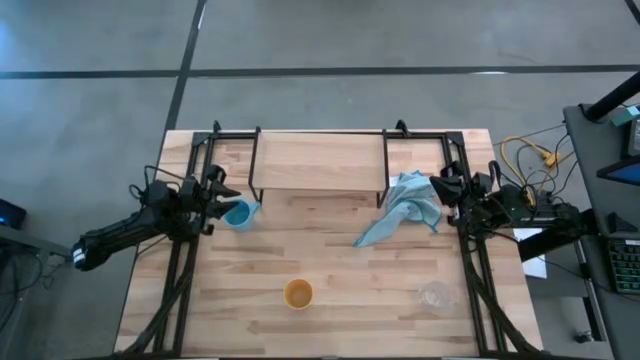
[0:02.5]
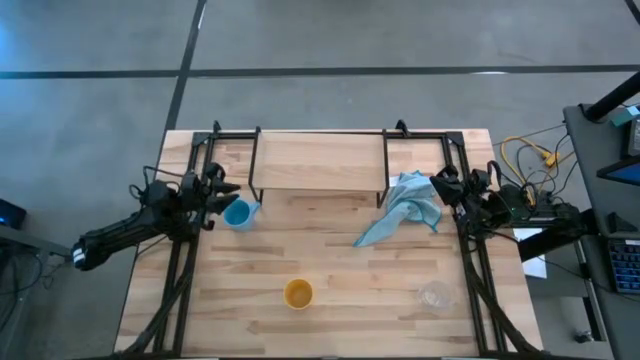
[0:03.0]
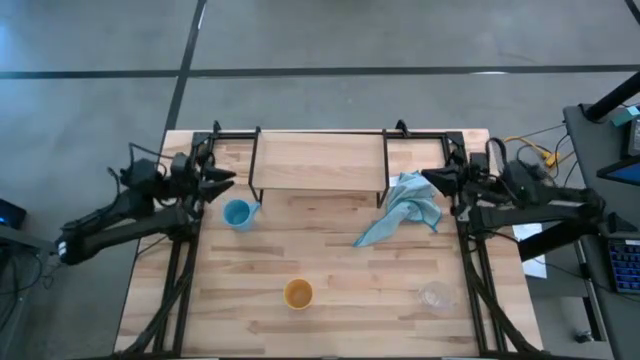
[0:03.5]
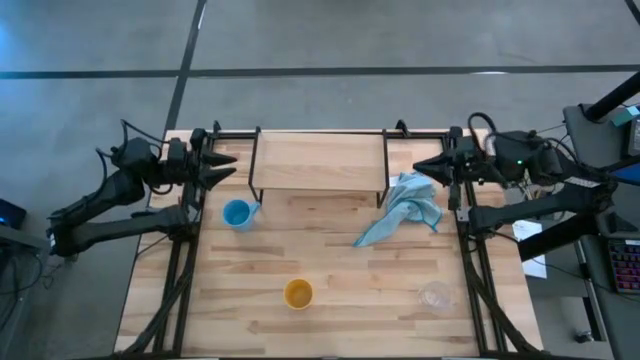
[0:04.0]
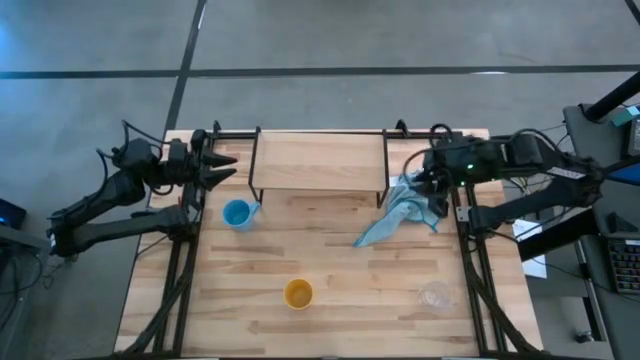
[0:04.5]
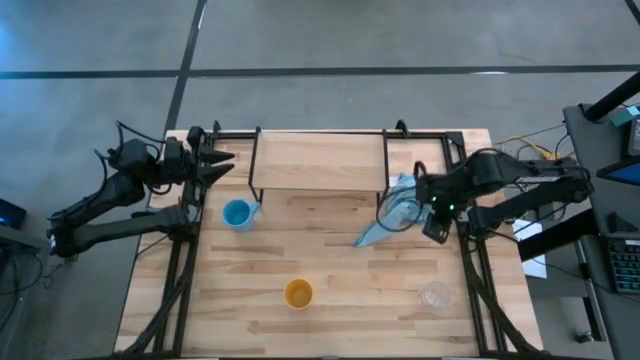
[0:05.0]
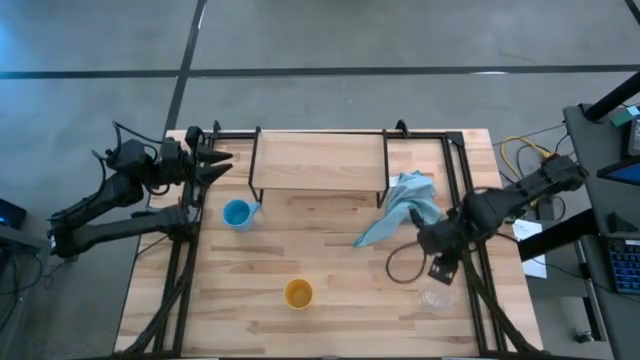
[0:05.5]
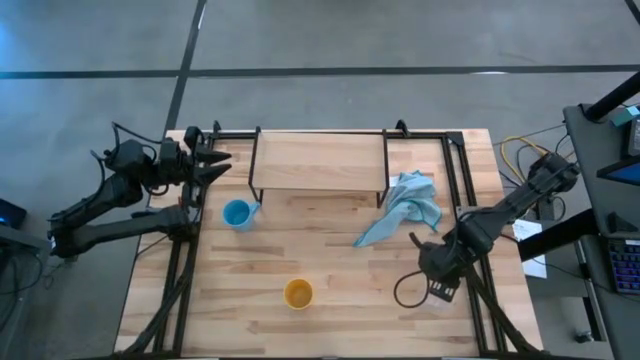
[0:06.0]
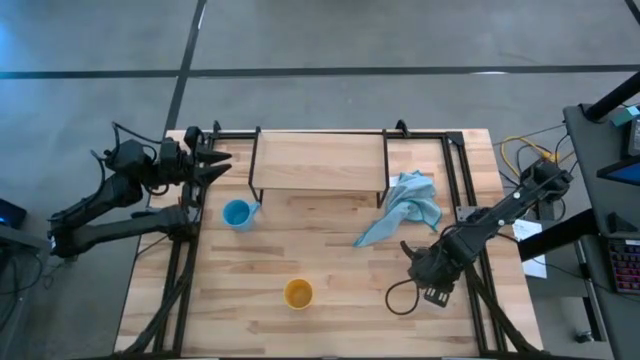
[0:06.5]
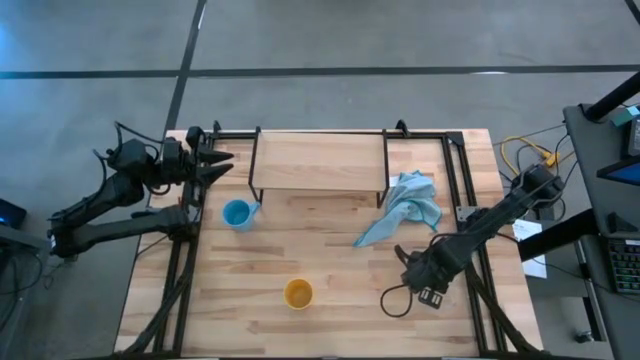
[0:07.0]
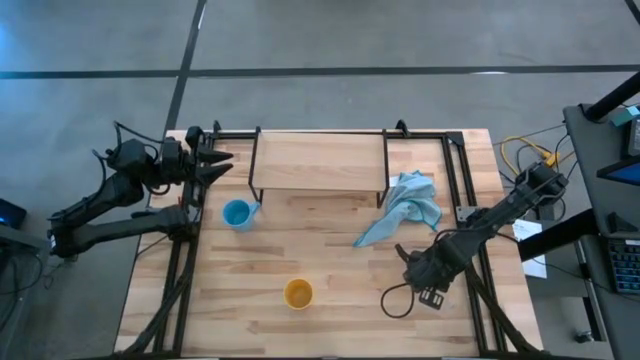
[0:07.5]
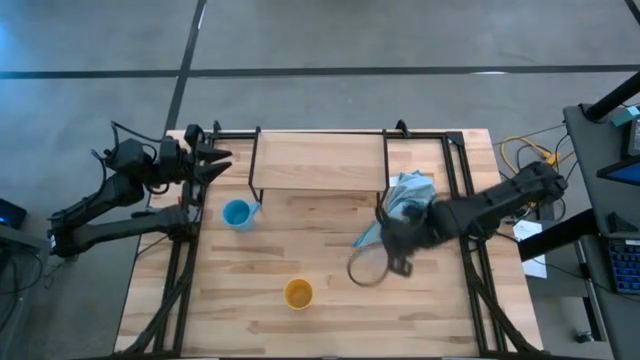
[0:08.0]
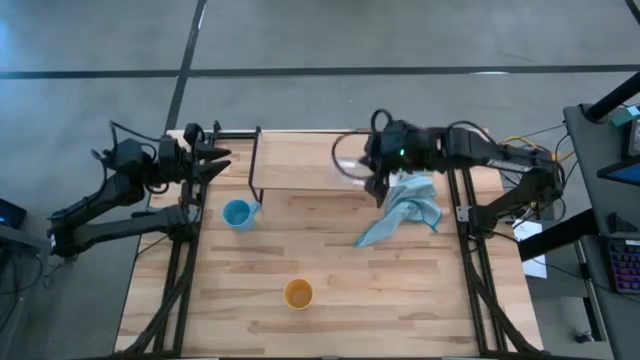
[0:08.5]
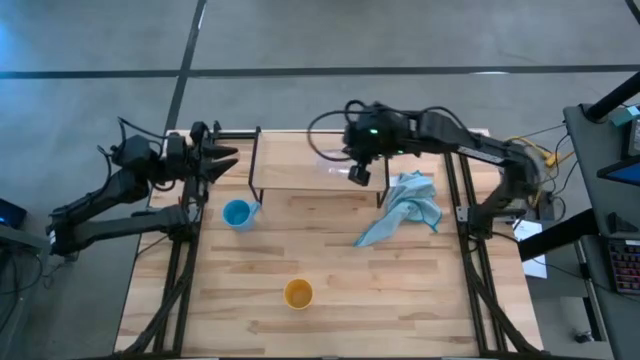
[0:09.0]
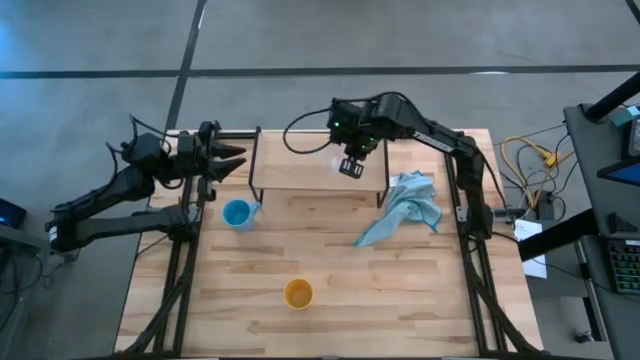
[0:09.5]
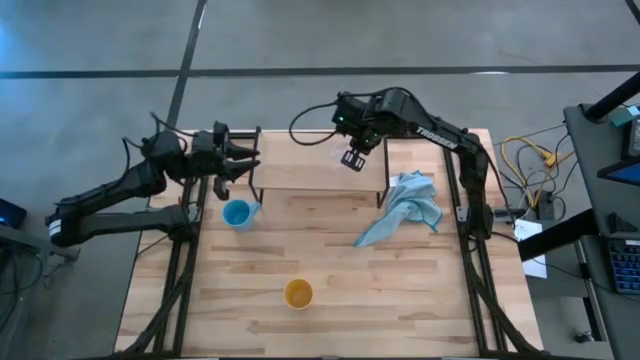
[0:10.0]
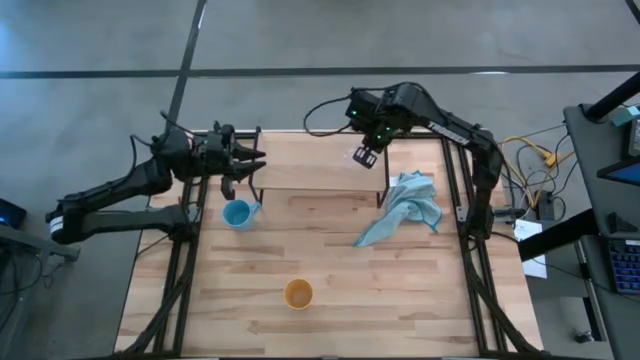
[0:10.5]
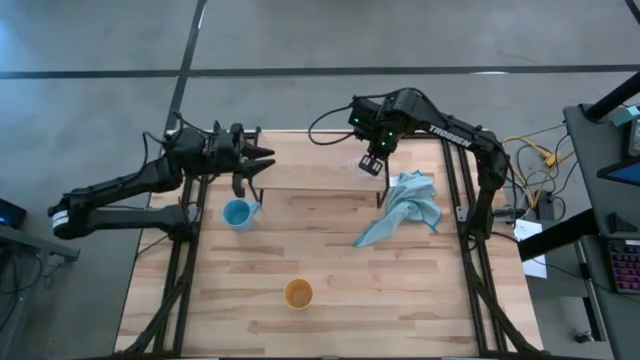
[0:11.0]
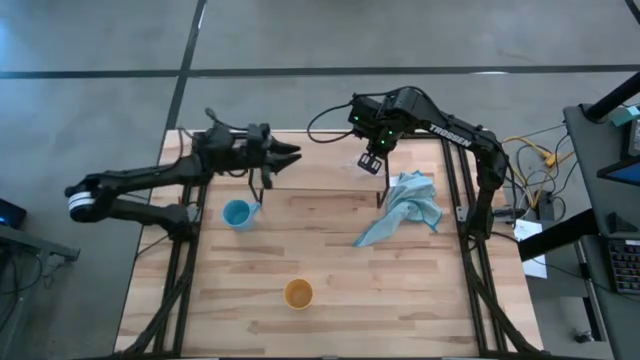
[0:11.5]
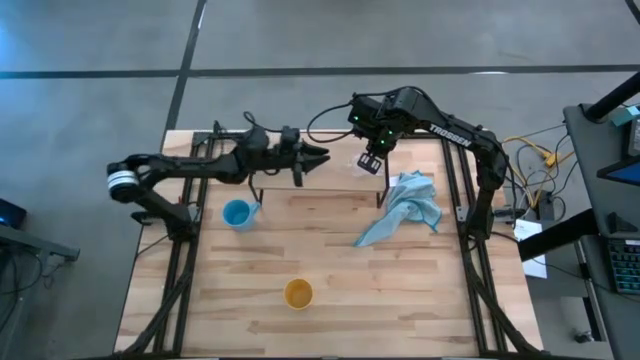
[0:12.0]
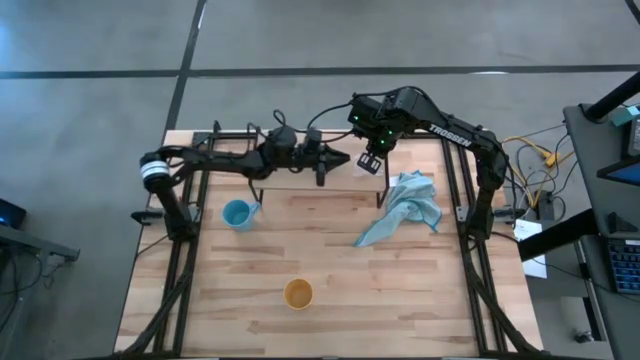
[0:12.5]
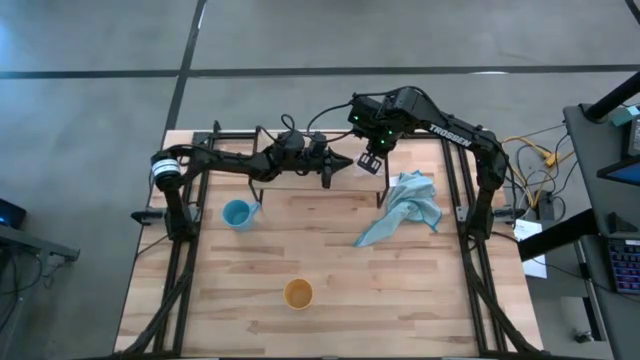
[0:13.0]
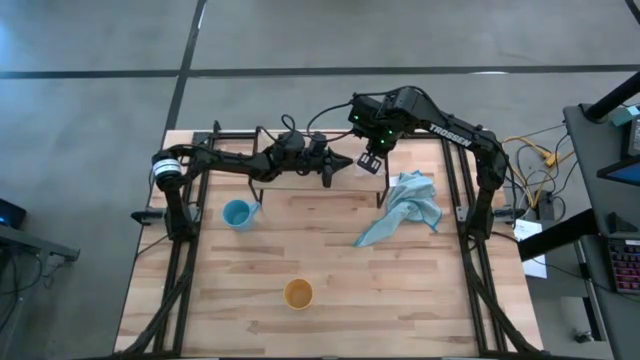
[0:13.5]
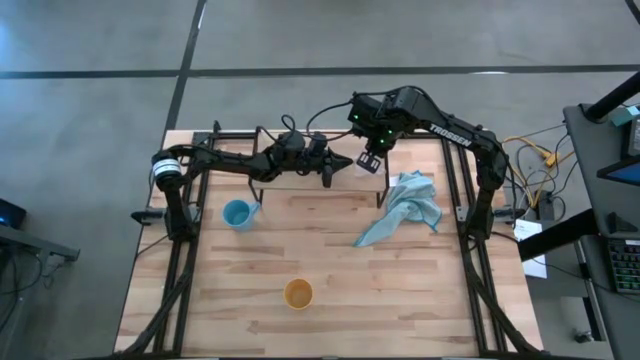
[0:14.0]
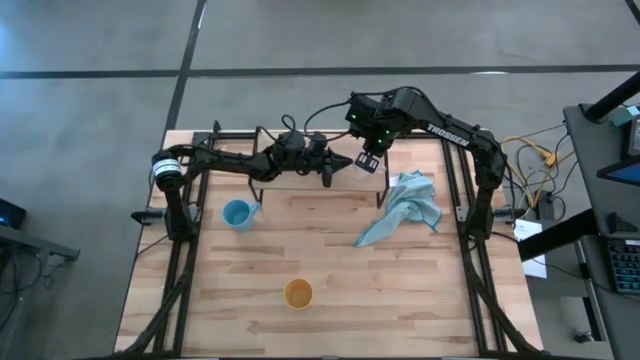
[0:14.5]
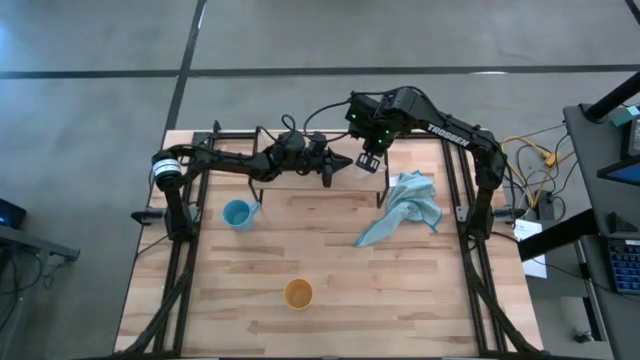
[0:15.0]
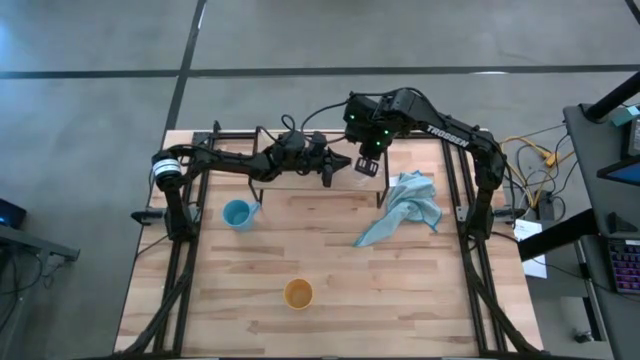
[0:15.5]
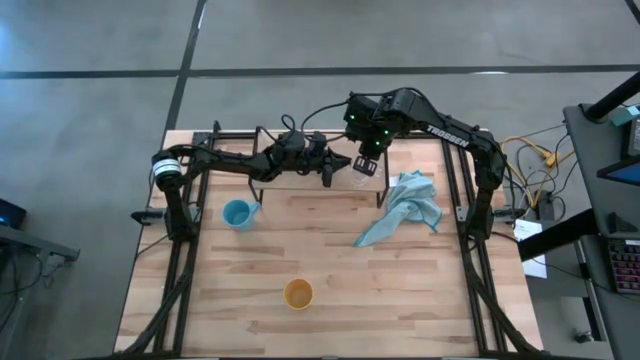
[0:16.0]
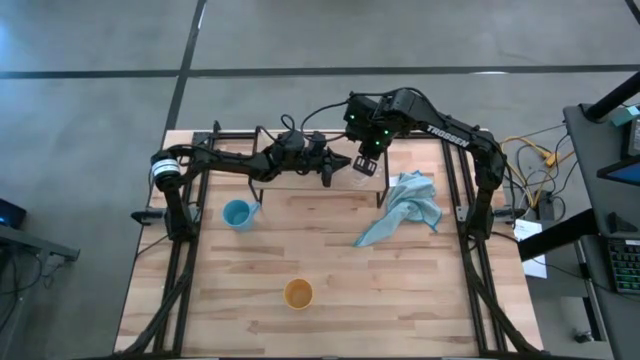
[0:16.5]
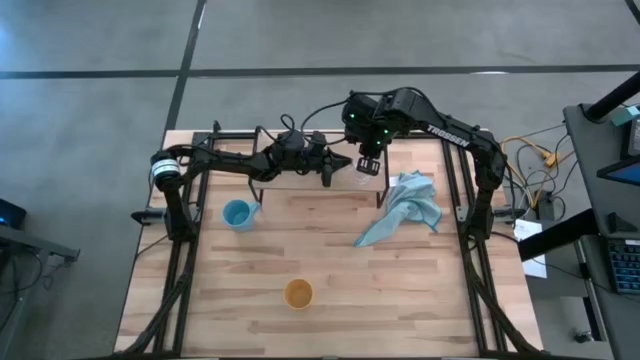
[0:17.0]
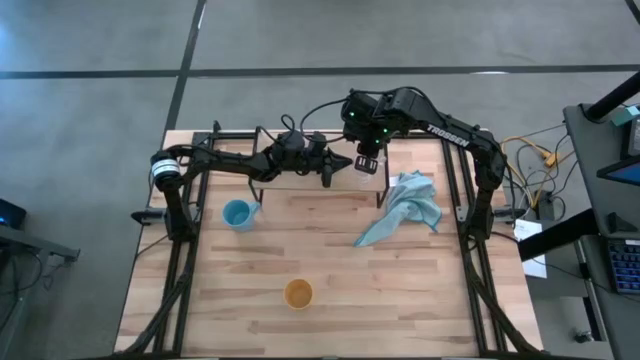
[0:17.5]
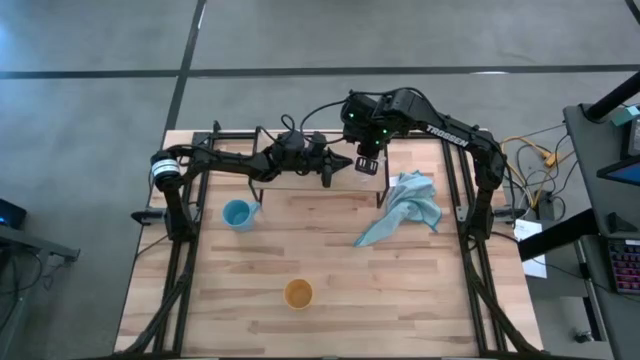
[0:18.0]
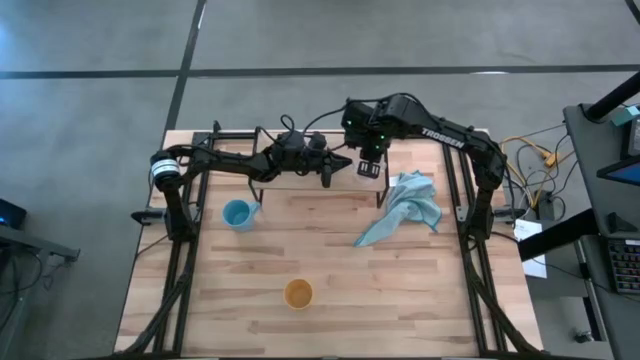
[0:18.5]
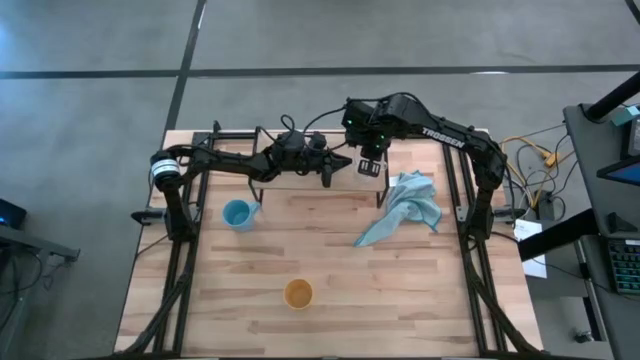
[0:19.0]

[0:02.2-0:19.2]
Task: Stack small to large cups/mugs on shelf
Put the transparent mug on the shelf
